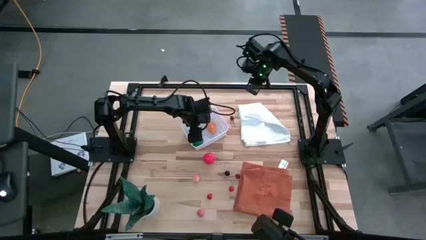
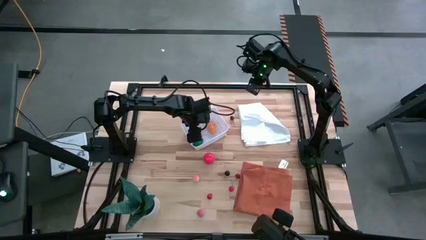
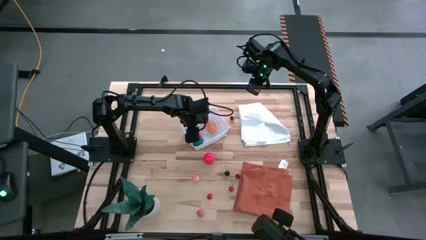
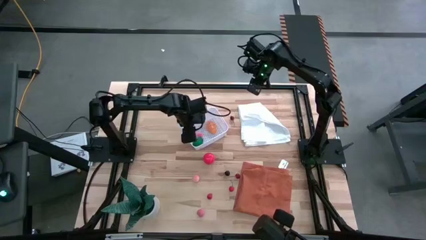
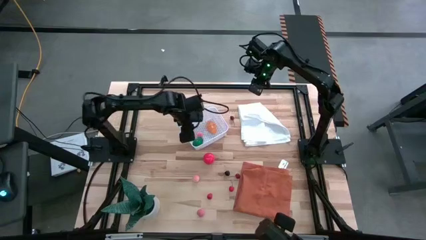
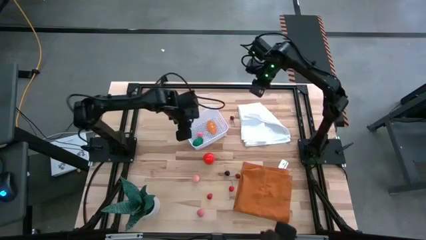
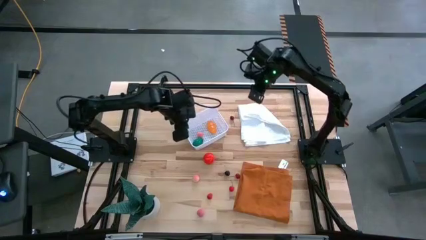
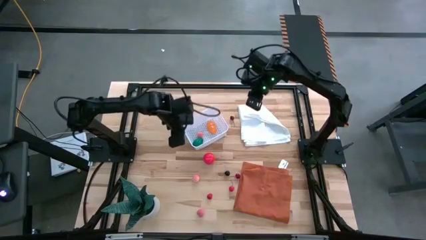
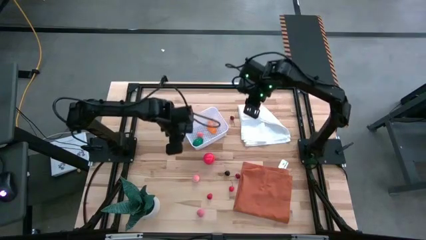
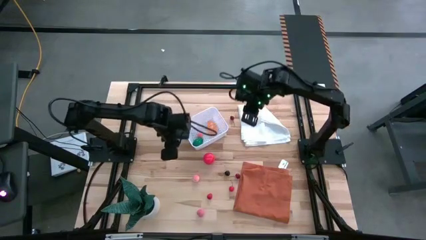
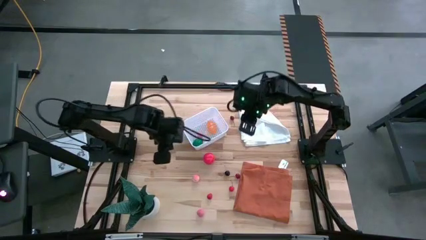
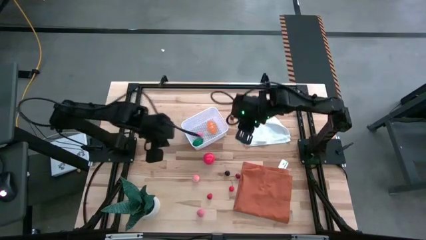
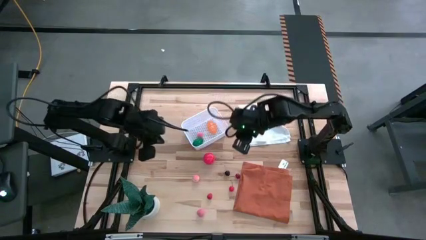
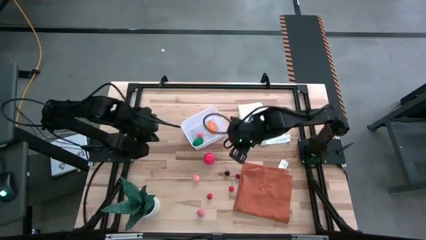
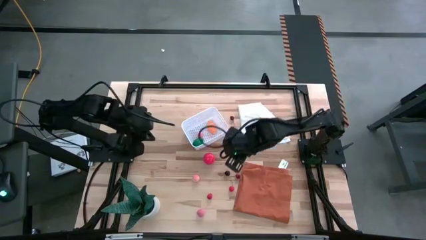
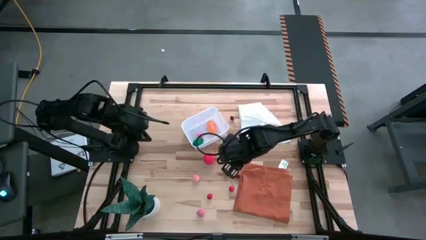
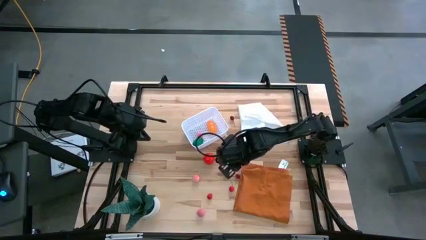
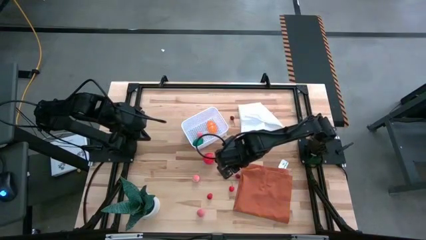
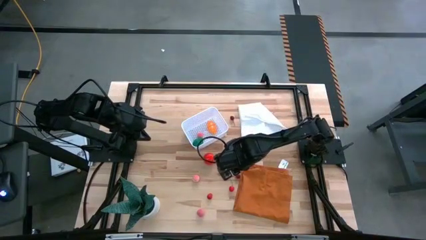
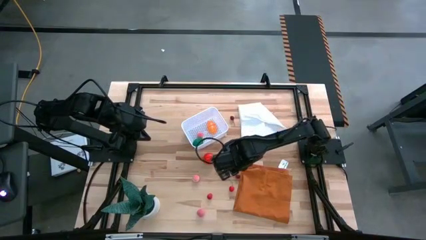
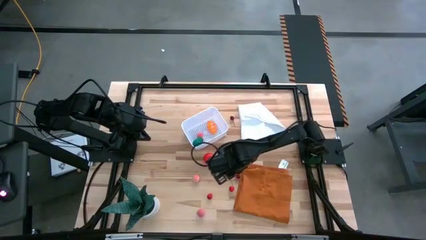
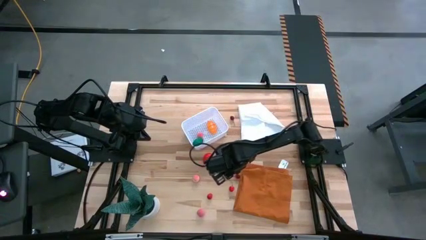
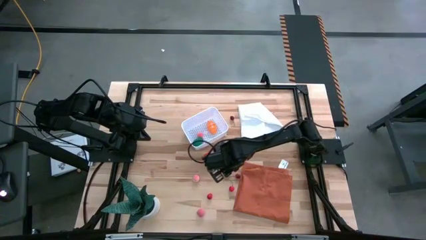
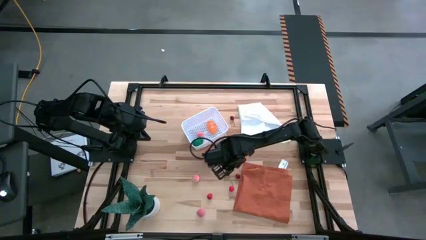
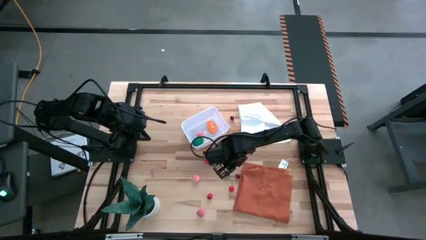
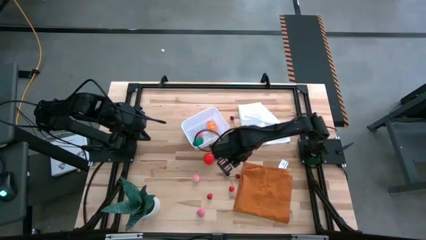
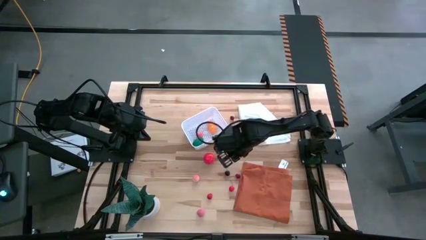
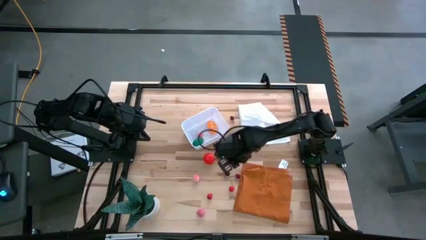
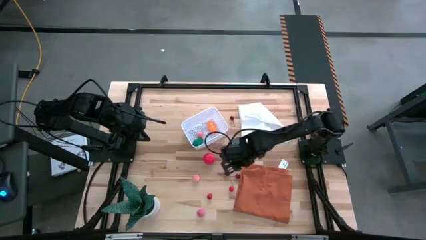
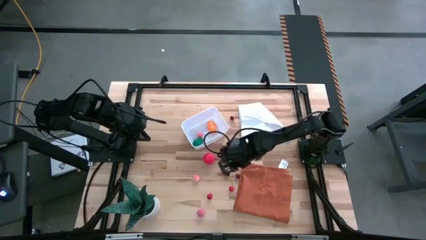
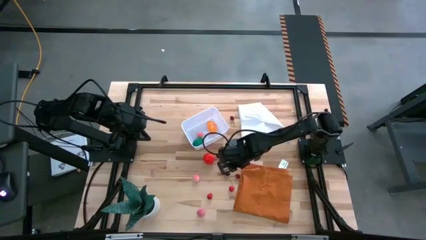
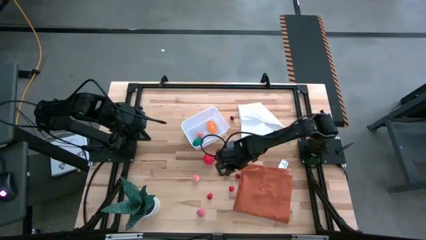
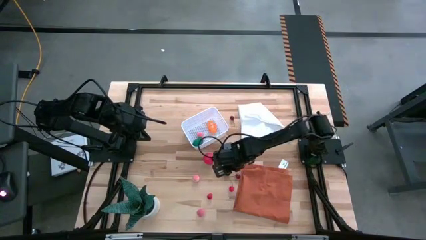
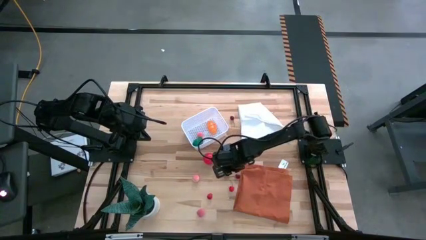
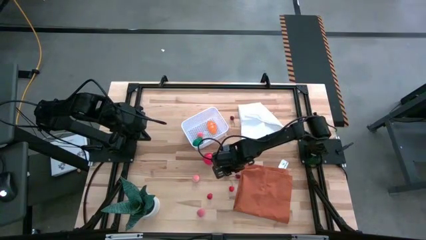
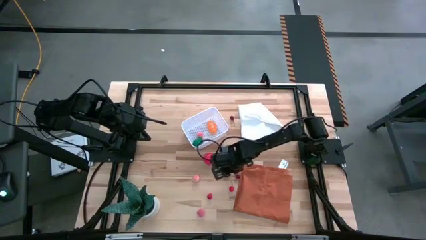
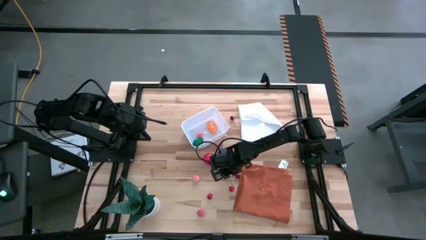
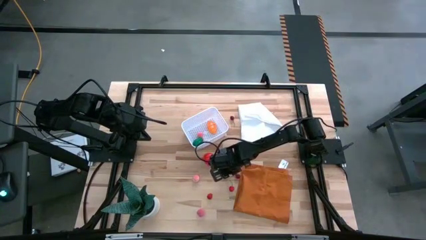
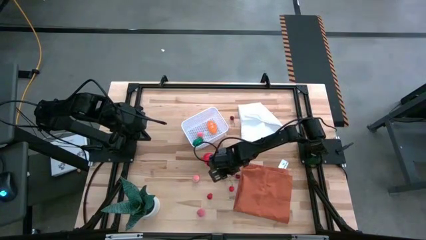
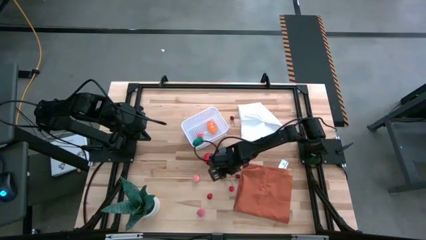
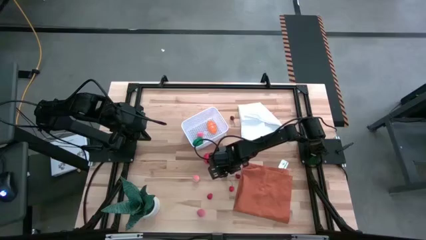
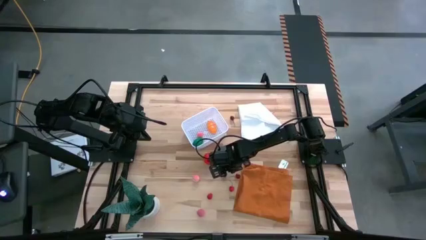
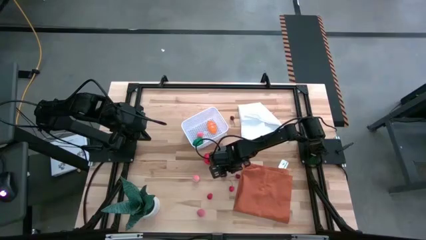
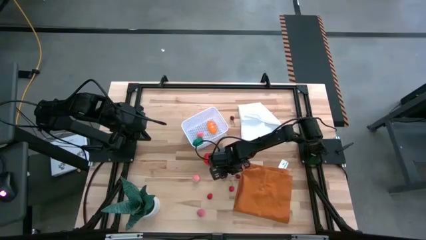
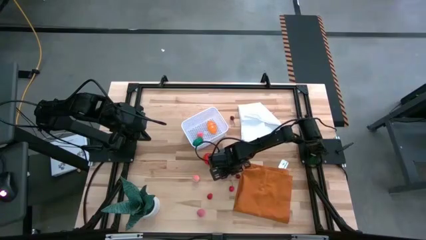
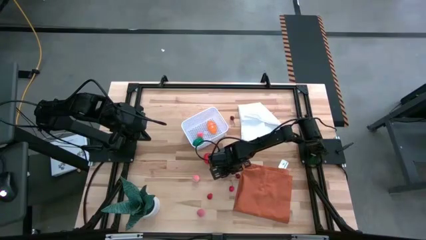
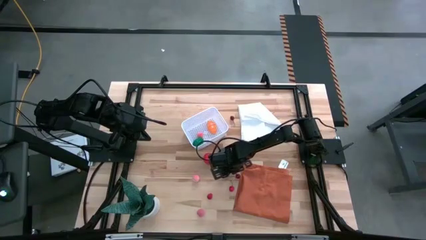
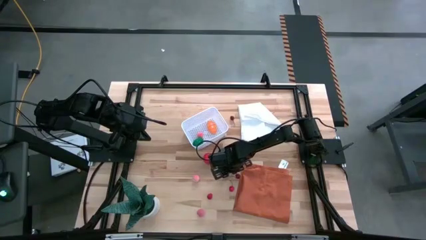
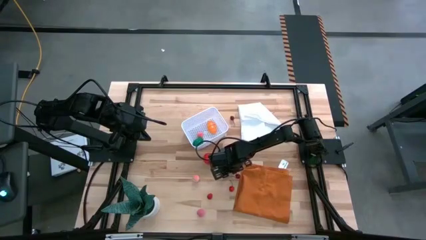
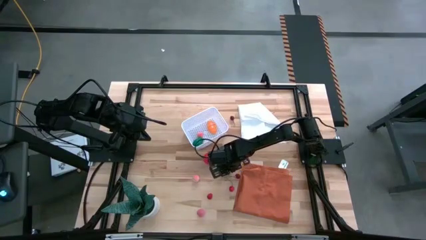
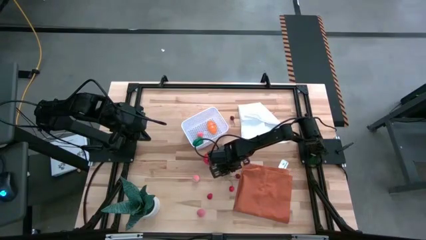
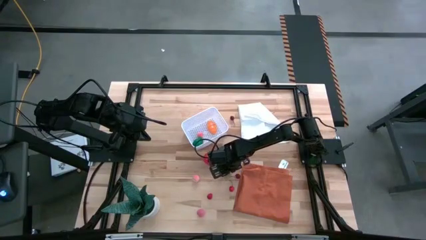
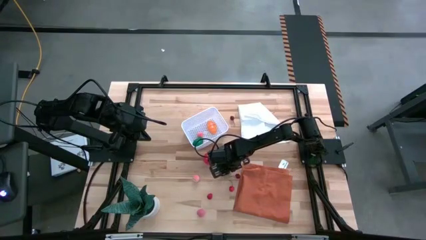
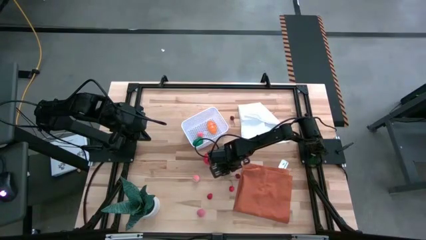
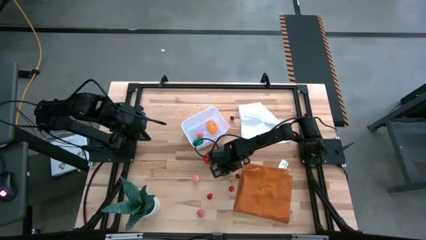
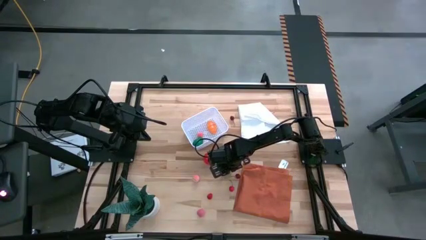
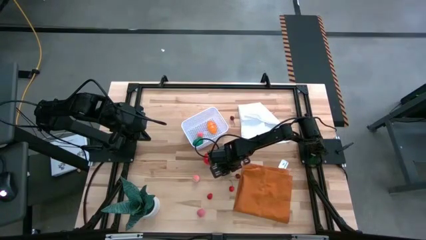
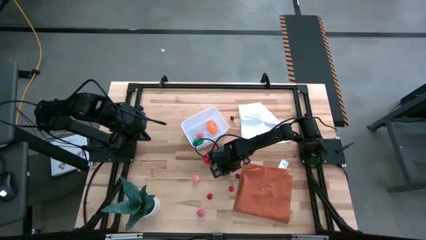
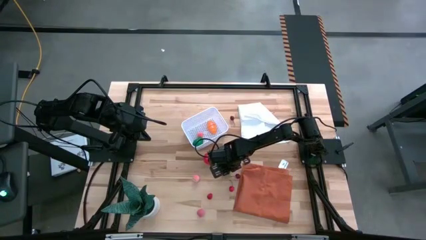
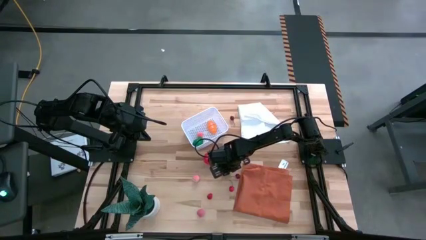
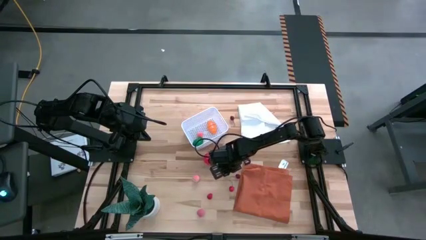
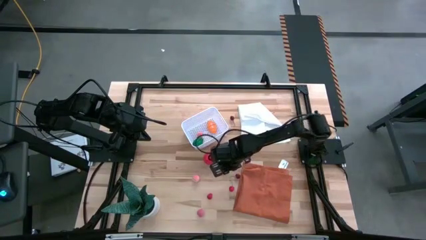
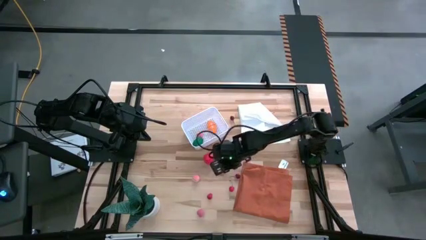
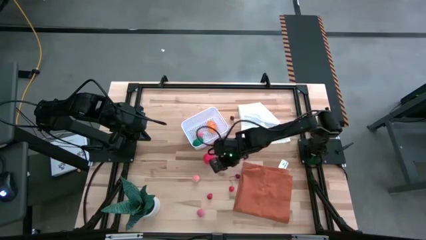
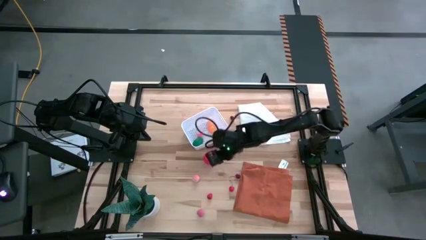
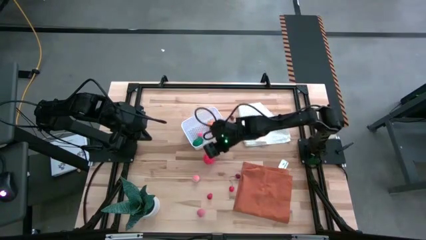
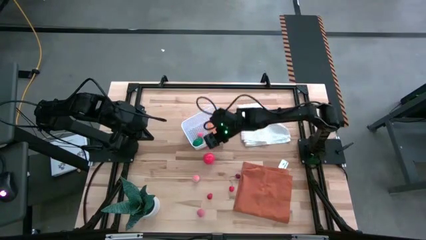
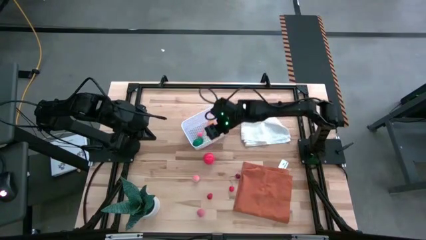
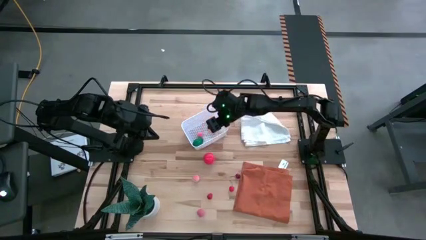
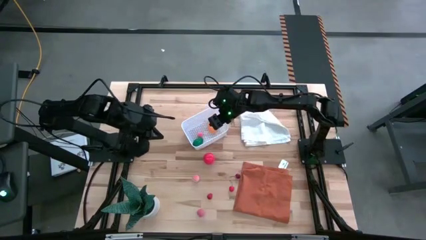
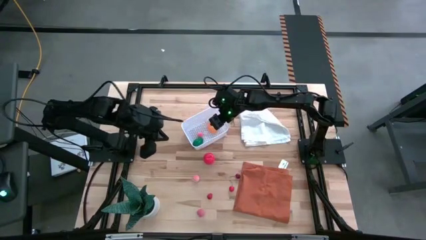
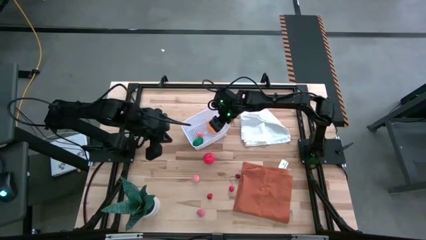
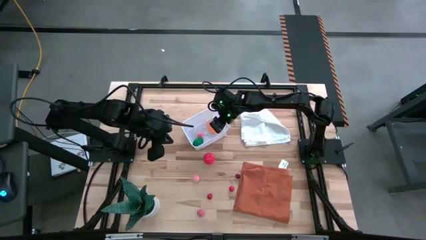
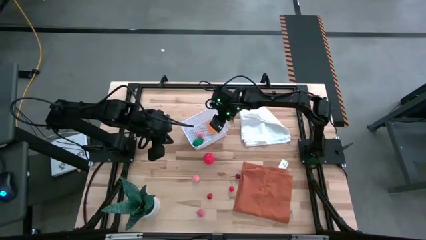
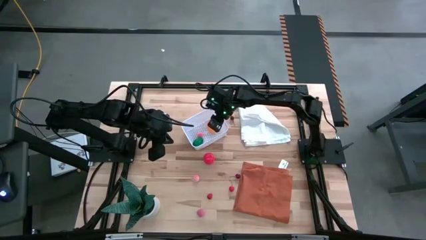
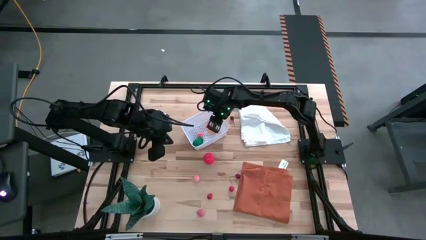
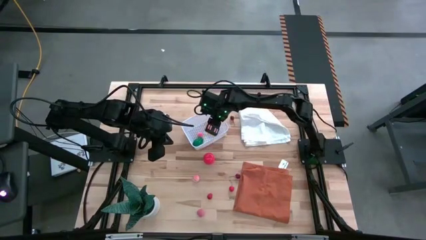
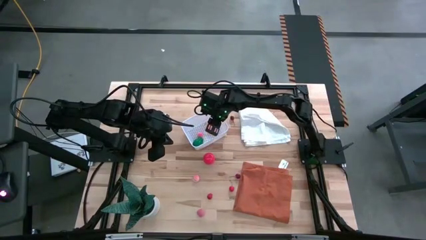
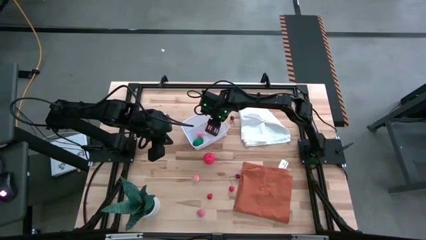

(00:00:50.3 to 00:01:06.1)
Task: Pick and placing Produce into tupperware
Put the black cherry in the basket

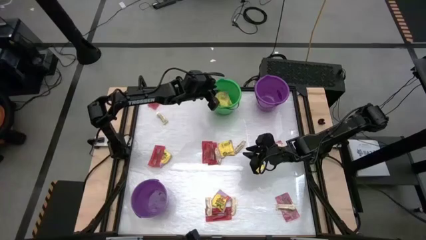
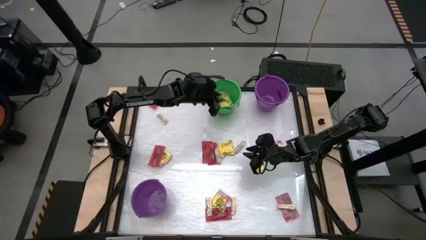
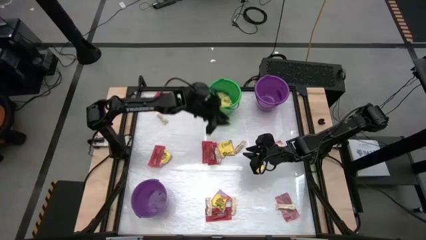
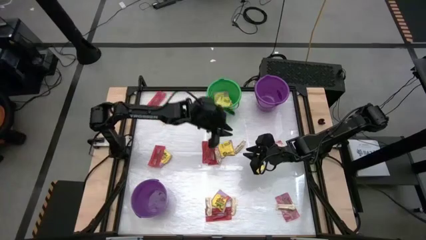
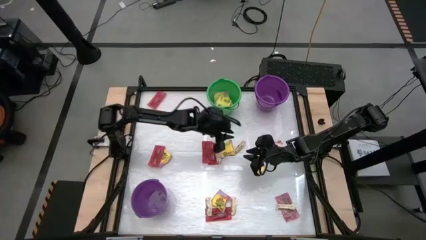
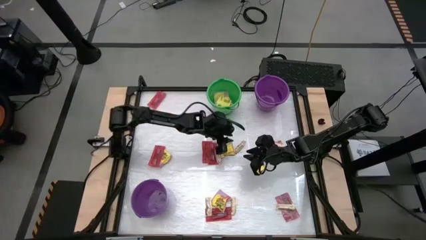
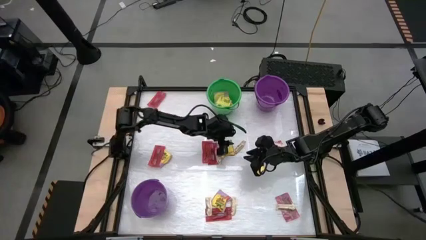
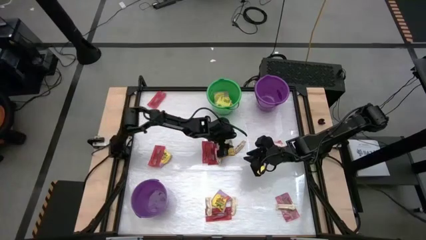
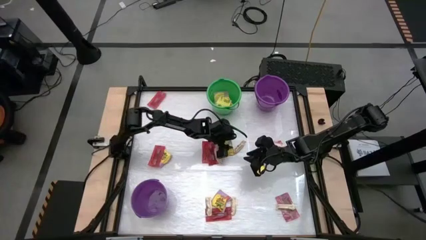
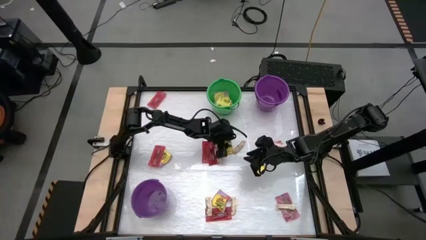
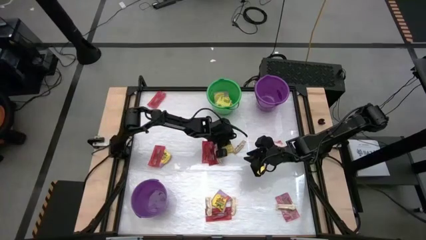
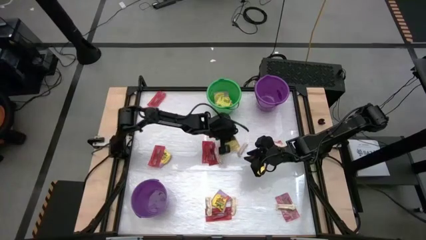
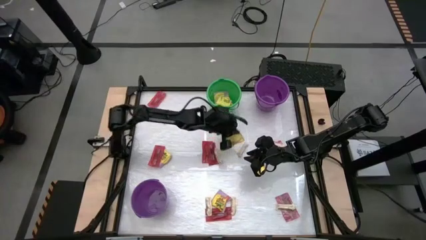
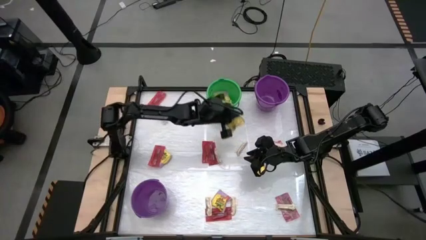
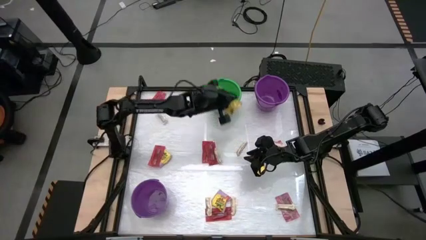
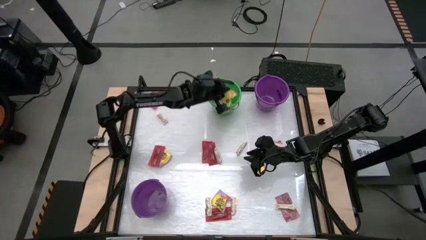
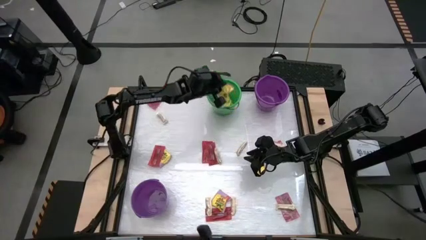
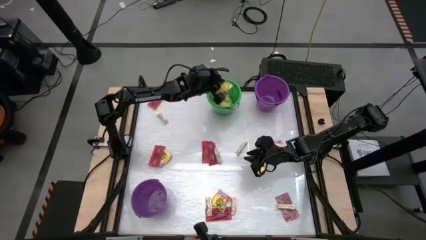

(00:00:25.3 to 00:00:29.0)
Task: Sort candy by brand, put in halloween buckets
Put the yellow candy into the green bucket
